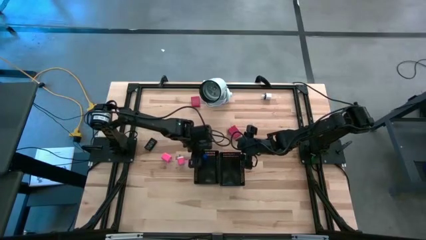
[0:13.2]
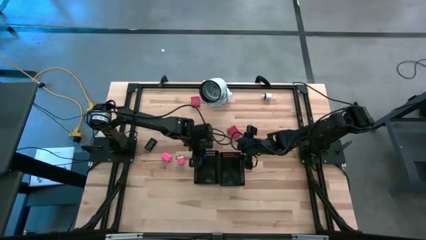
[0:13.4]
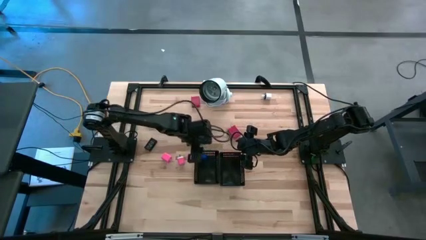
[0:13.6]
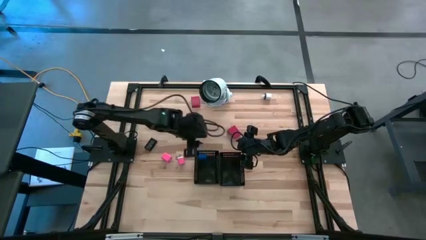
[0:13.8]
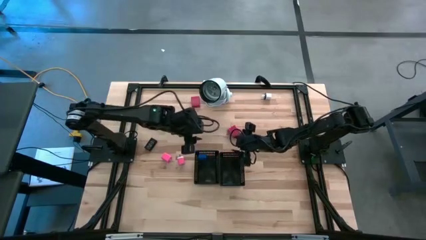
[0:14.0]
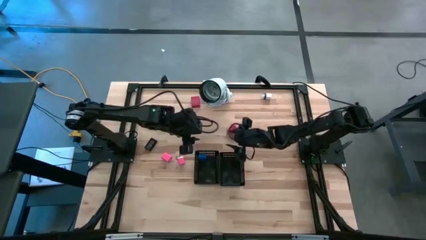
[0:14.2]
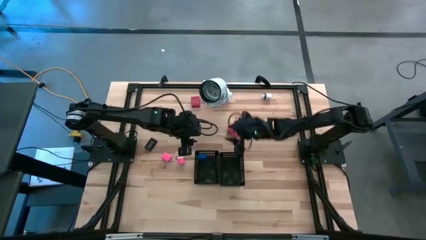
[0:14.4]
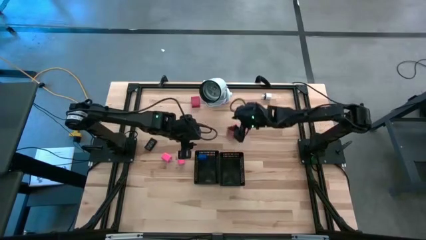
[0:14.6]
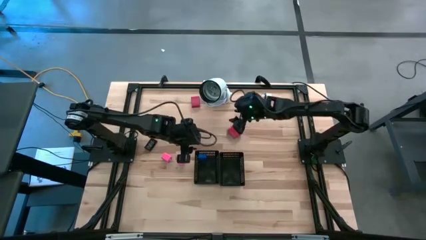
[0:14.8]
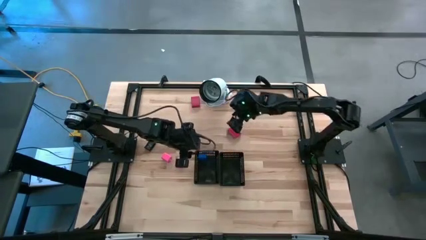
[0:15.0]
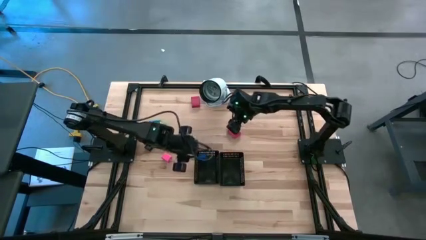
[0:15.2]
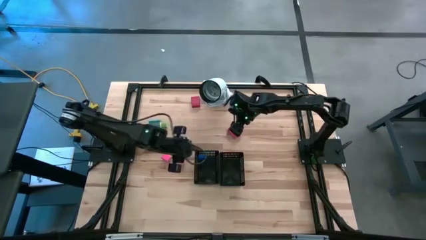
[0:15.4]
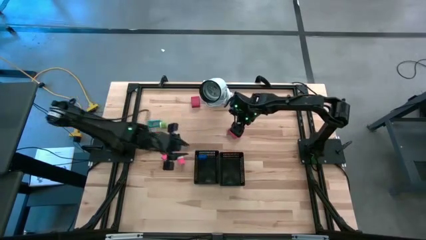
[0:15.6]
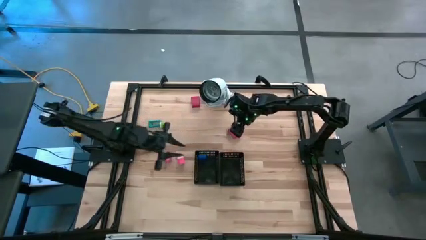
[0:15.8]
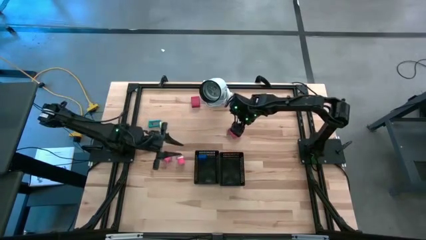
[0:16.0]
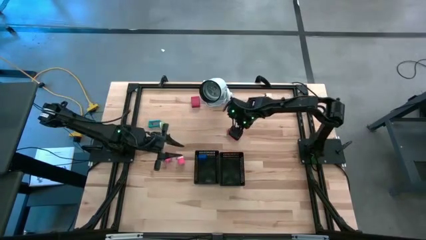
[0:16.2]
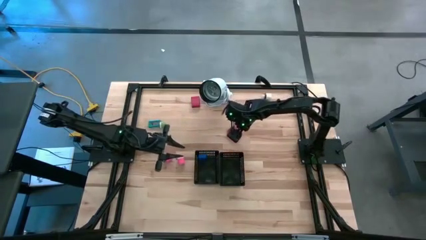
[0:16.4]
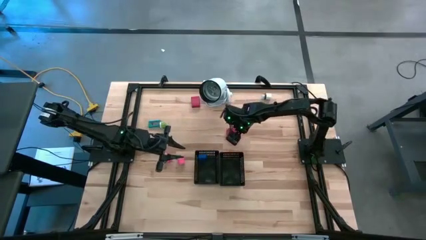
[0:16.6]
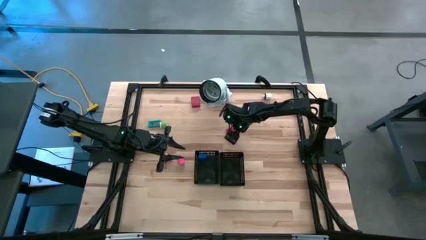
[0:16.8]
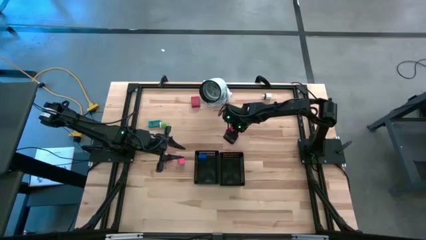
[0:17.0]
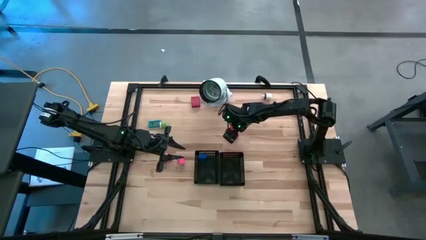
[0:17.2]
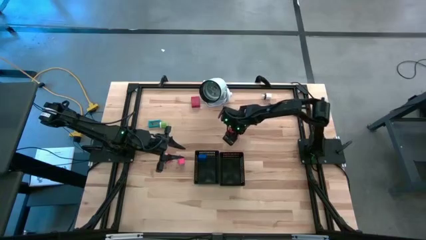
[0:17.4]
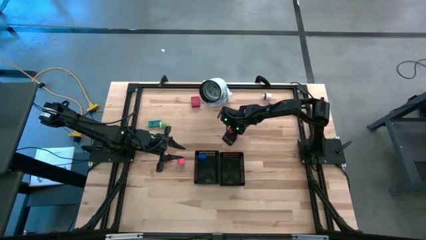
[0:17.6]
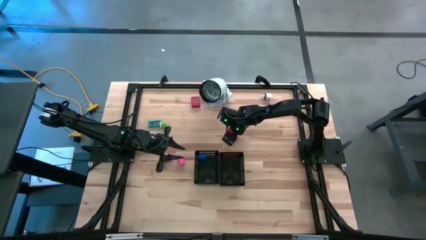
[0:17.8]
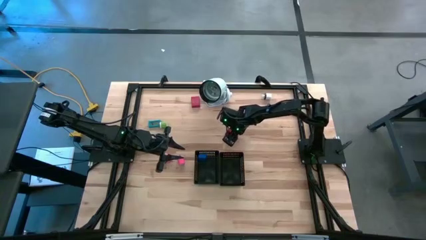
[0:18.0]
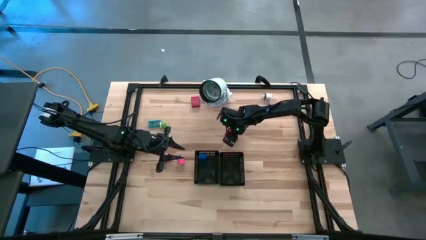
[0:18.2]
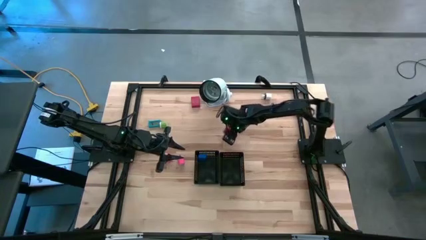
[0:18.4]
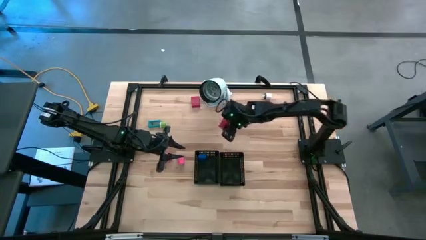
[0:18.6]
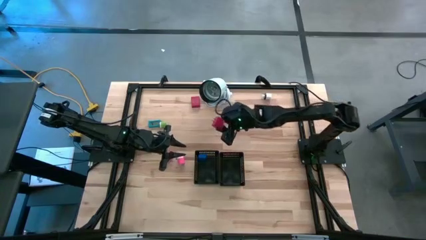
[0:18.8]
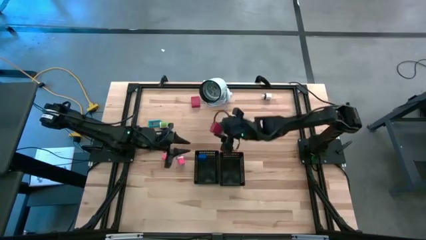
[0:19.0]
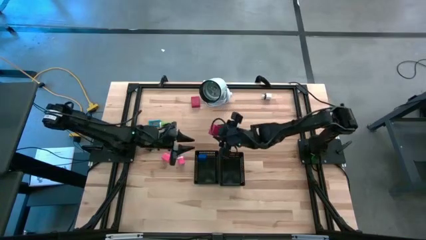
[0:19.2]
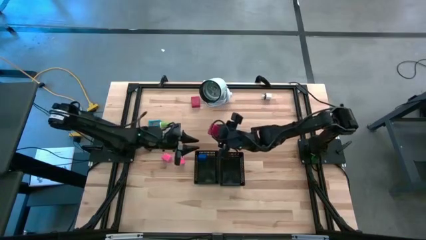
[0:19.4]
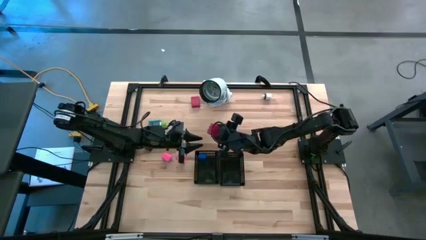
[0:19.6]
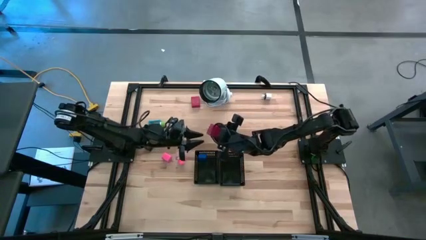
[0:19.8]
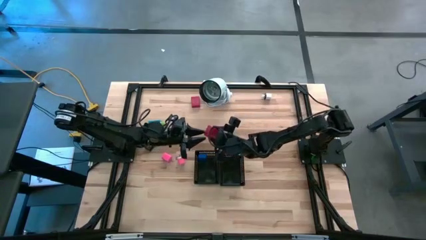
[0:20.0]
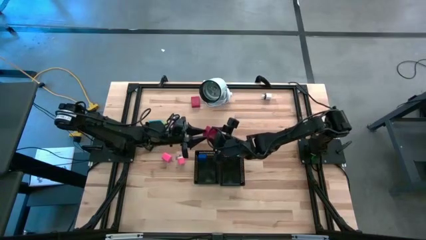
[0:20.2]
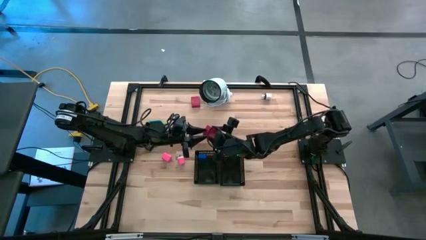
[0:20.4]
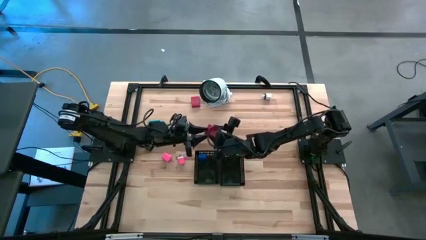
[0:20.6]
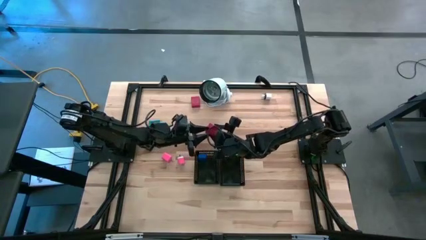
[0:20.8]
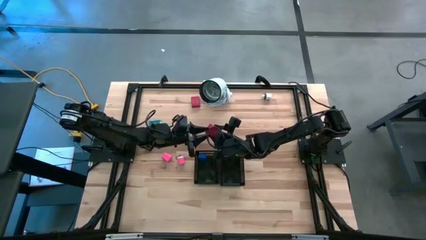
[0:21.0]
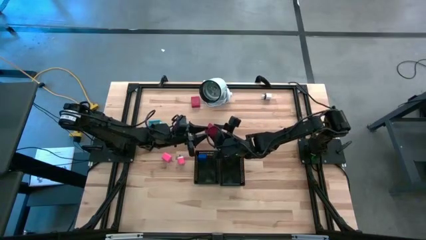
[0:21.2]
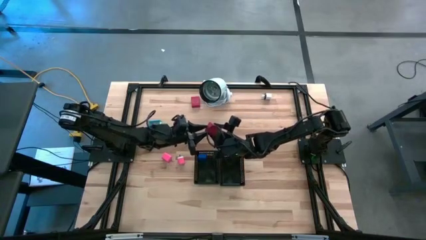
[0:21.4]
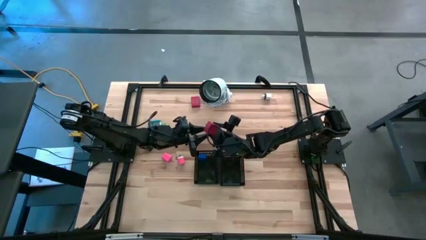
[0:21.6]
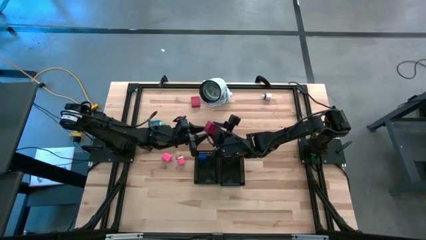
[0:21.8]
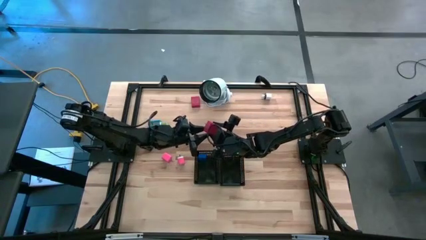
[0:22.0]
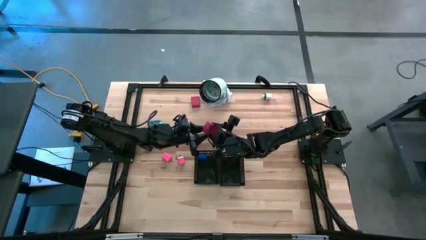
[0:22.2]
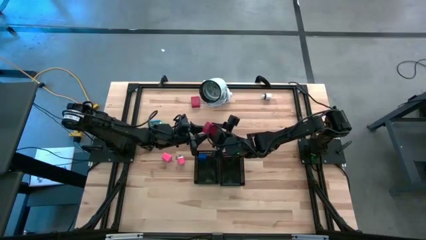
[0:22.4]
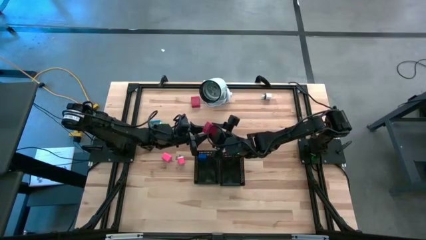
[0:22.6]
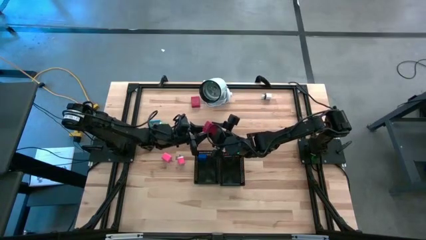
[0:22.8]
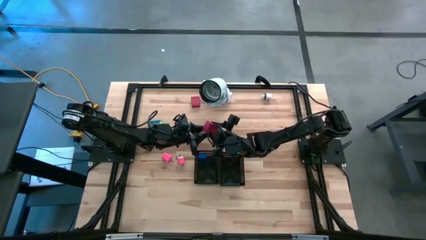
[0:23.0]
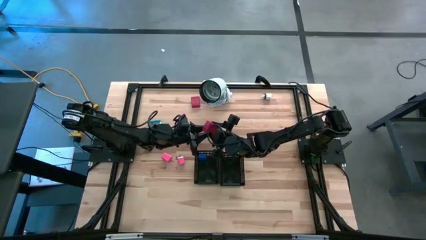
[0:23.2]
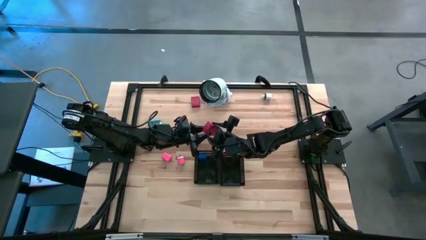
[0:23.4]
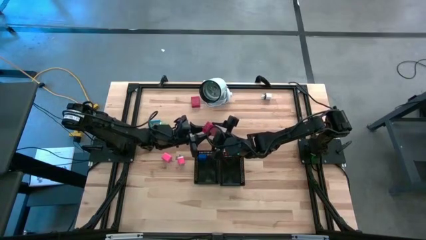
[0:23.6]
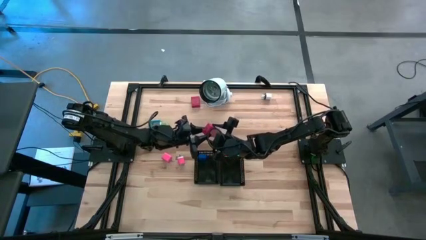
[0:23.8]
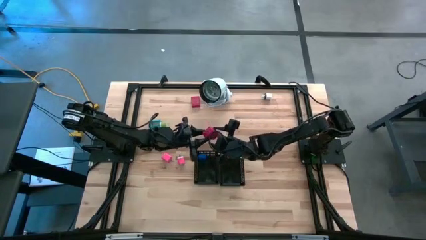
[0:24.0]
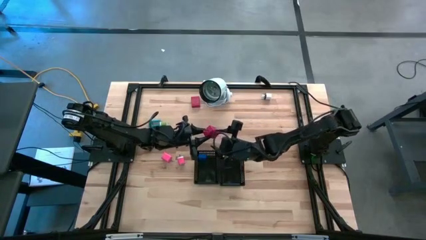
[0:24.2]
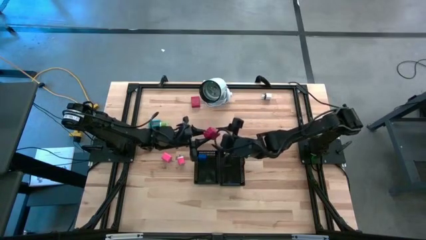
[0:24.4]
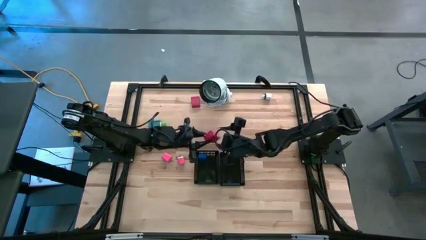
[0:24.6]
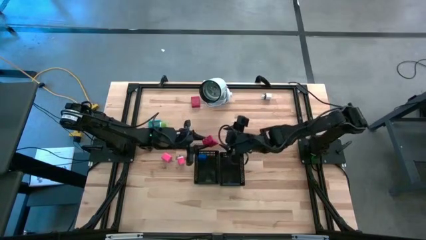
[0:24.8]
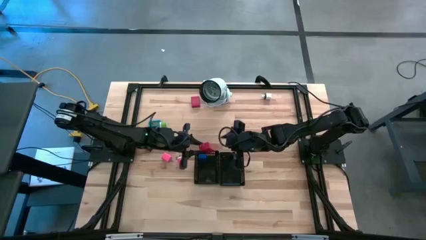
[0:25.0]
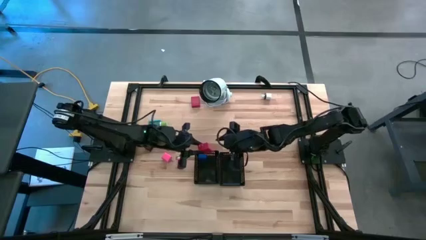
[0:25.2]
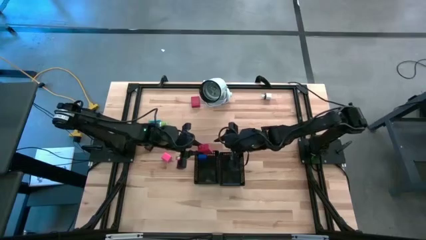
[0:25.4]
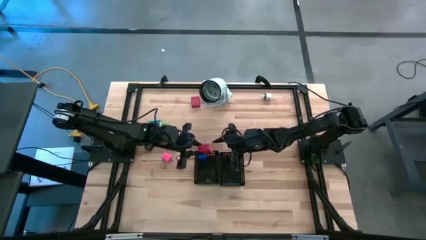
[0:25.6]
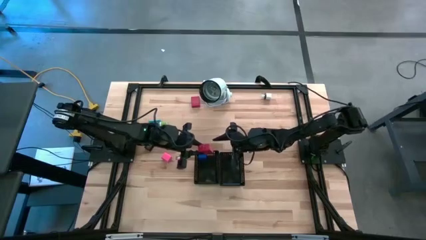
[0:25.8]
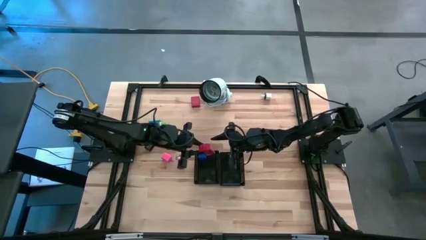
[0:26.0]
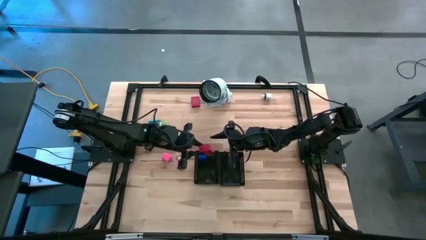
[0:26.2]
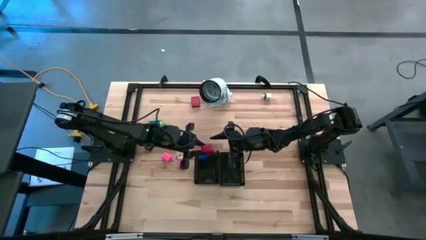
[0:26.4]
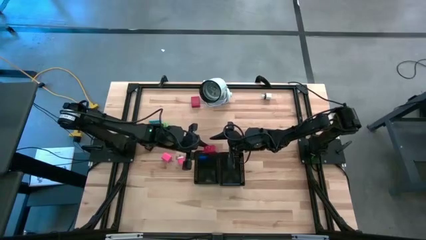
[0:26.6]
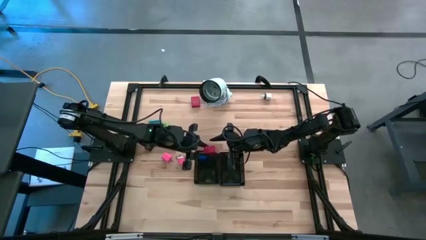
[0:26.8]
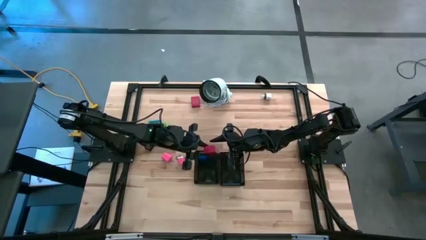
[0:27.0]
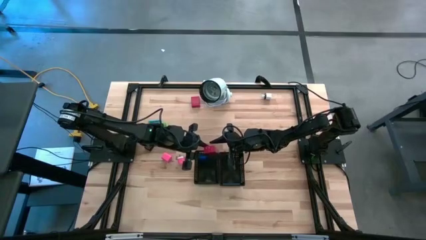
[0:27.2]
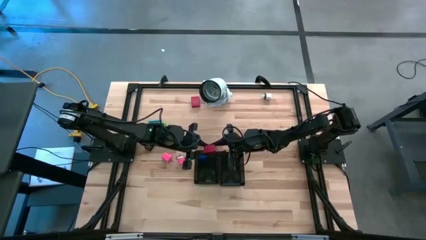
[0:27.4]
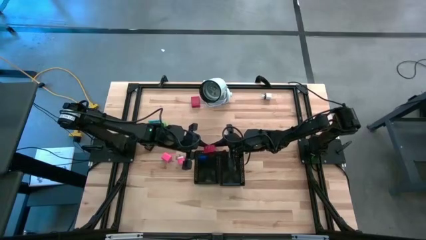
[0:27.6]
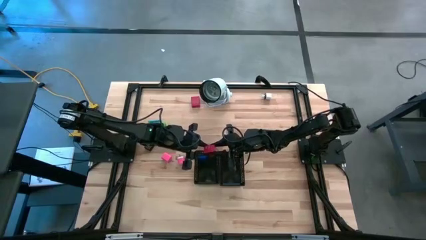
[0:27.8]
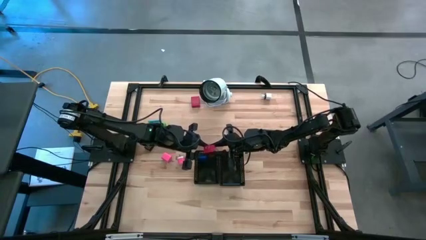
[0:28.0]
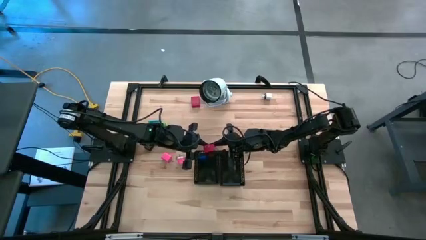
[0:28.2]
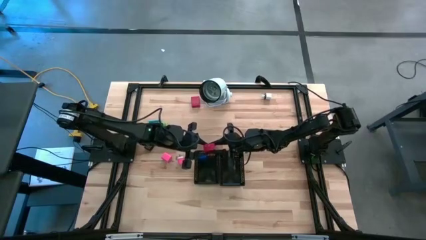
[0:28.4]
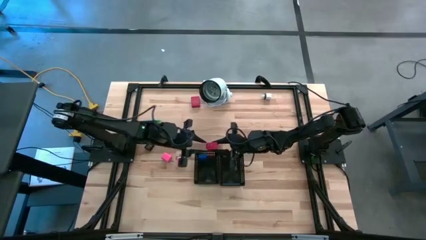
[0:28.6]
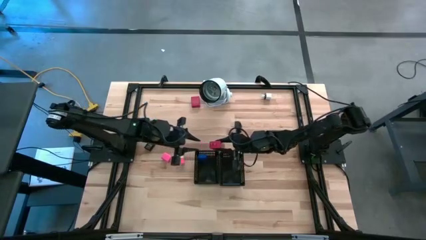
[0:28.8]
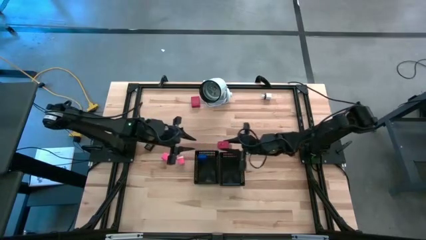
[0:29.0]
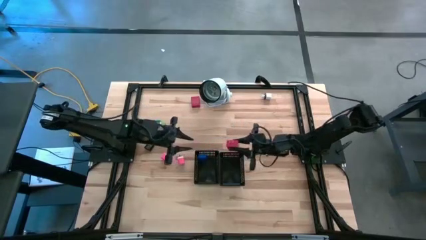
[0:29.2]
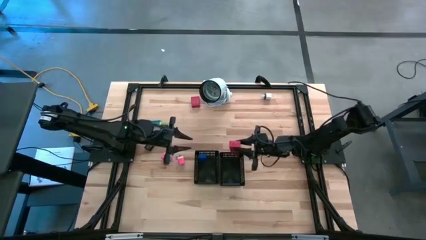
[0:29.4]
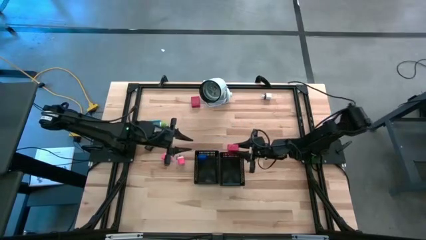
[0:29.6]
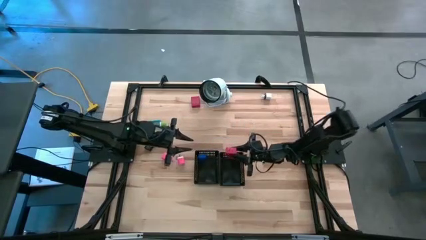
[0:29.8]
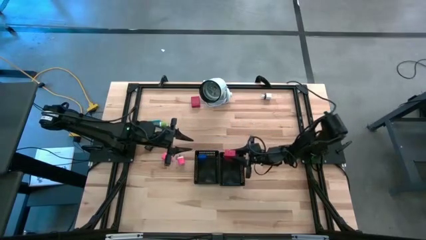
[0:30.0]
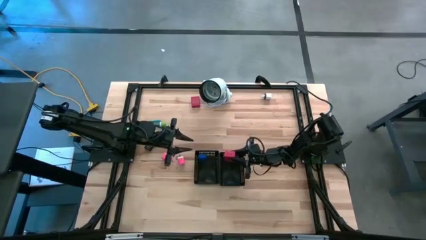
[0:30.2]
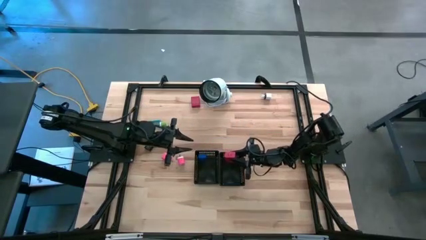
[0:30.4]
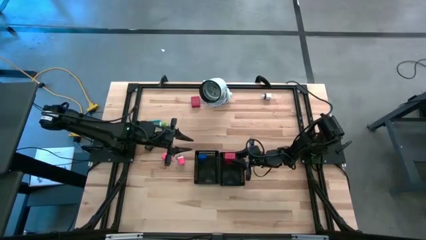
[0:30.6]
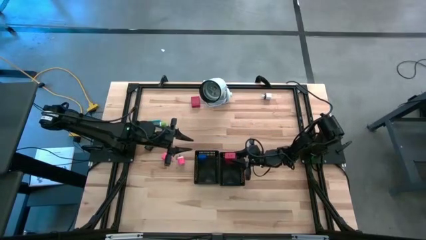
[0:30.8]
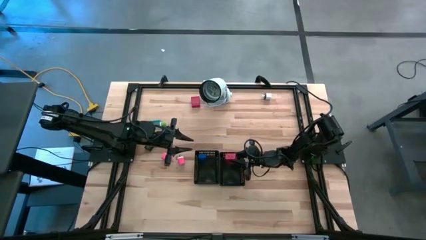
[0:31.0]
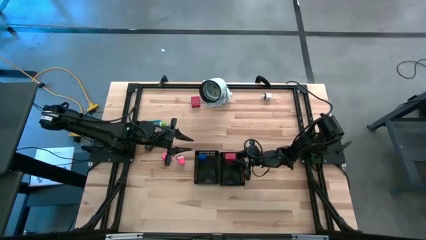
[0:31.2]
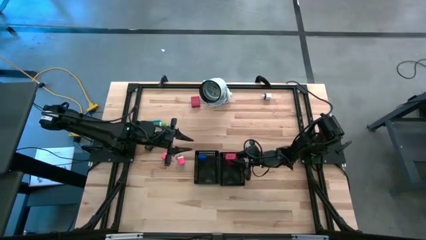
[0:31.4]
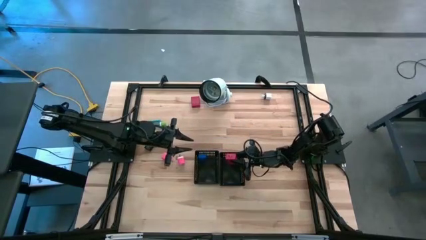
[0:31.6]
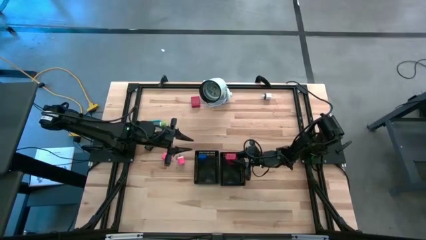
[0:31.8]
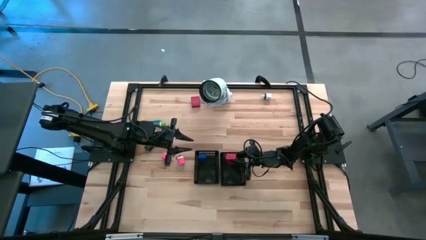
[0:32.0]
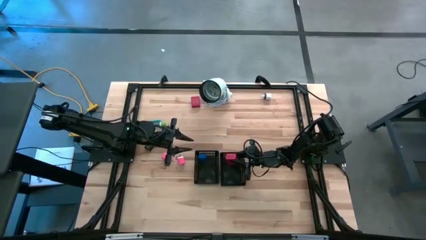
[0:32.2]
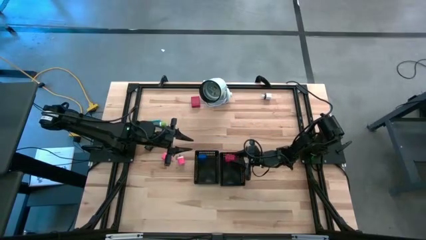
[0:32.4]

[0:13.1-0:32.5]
Task: Pick & Place Office items
Put the bottom red charger adapter into the right black bin
